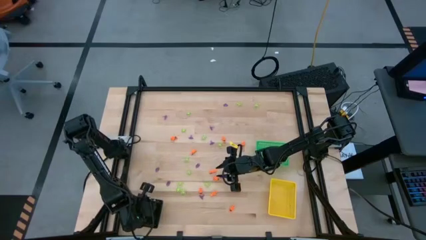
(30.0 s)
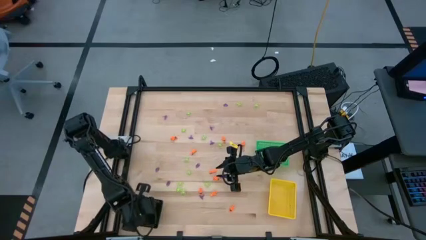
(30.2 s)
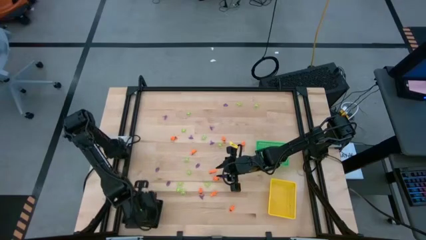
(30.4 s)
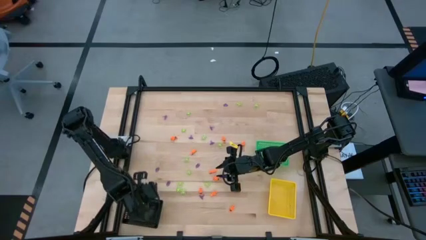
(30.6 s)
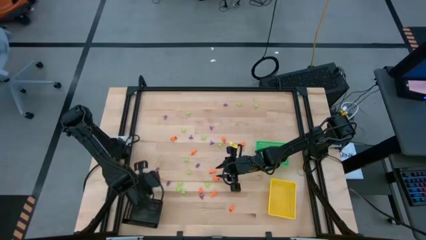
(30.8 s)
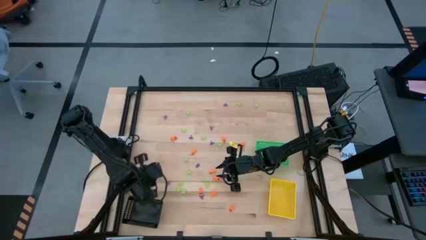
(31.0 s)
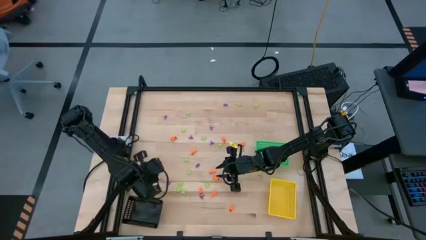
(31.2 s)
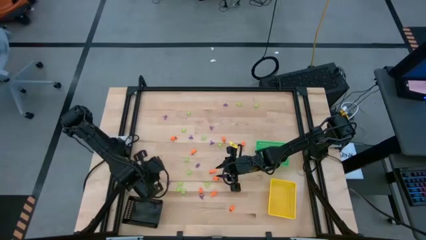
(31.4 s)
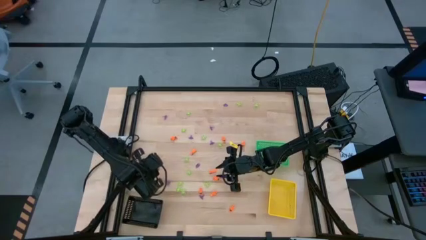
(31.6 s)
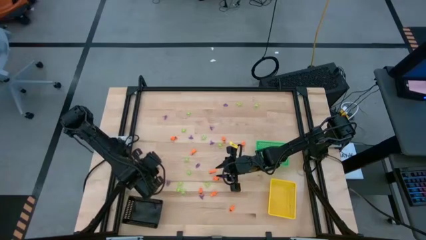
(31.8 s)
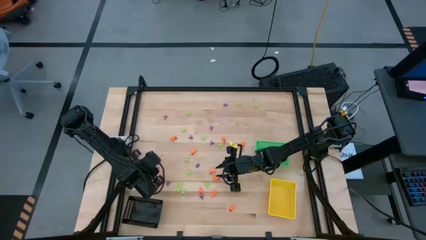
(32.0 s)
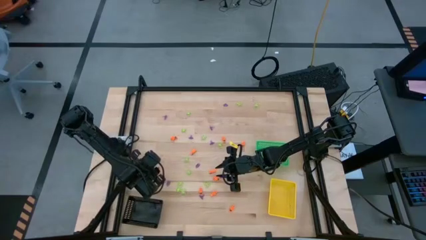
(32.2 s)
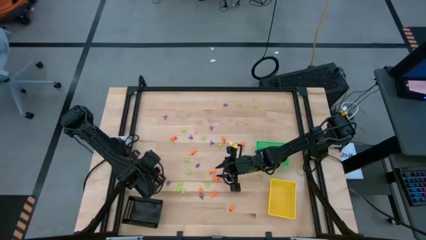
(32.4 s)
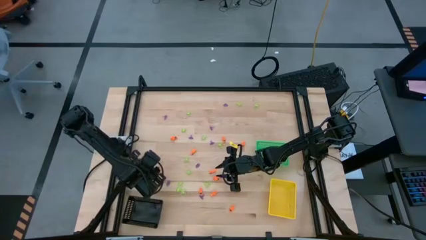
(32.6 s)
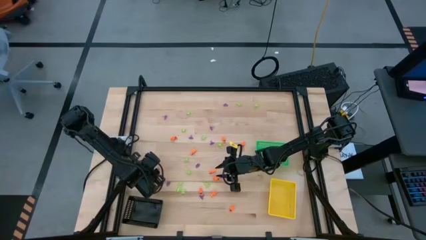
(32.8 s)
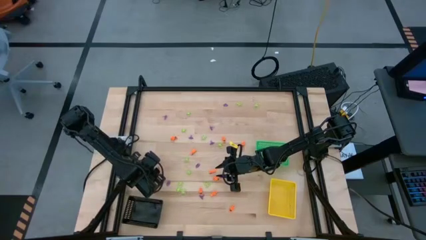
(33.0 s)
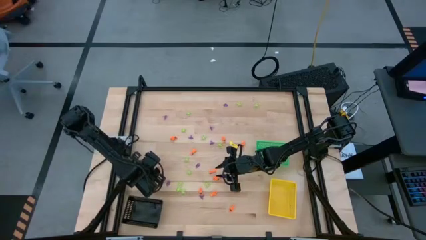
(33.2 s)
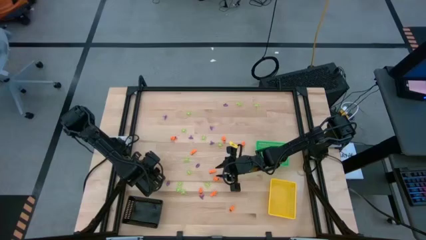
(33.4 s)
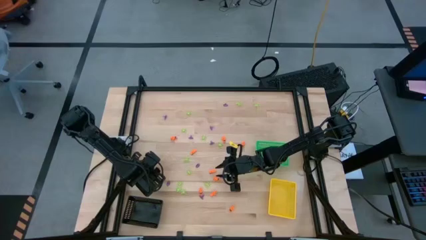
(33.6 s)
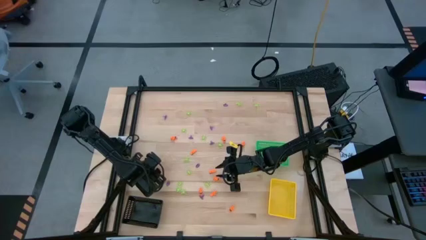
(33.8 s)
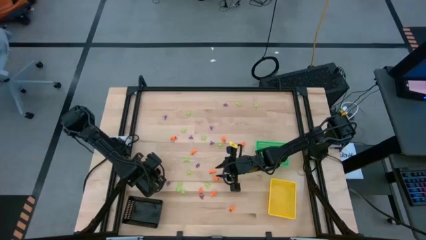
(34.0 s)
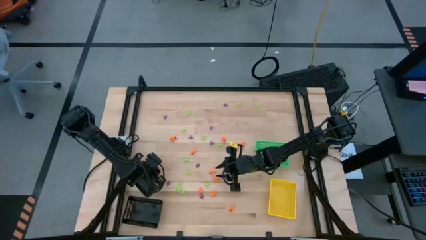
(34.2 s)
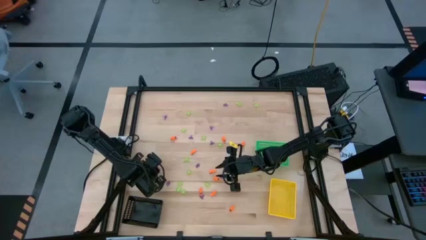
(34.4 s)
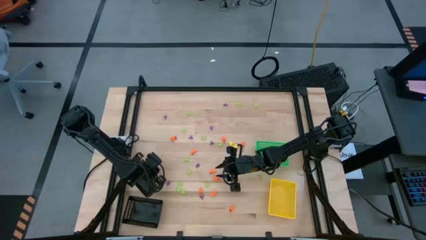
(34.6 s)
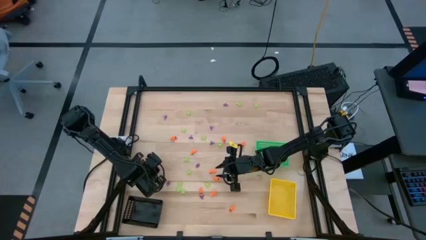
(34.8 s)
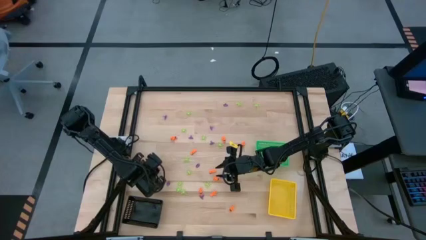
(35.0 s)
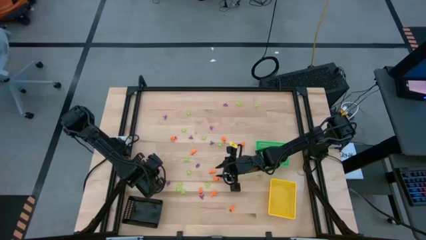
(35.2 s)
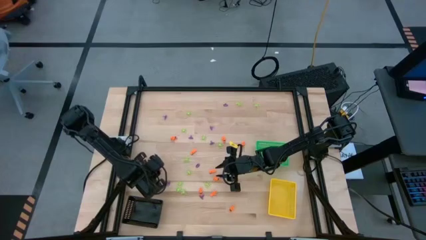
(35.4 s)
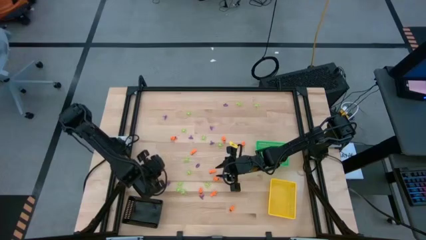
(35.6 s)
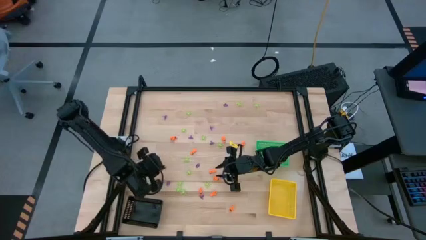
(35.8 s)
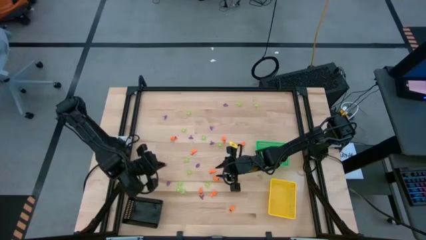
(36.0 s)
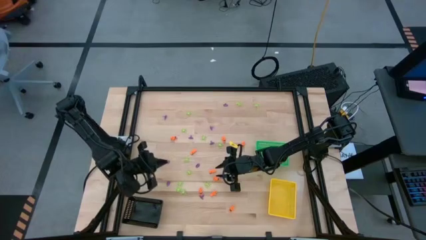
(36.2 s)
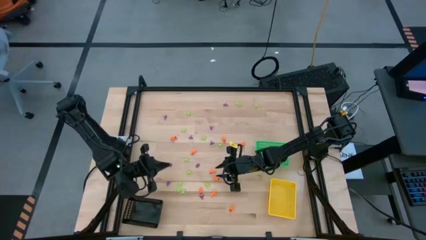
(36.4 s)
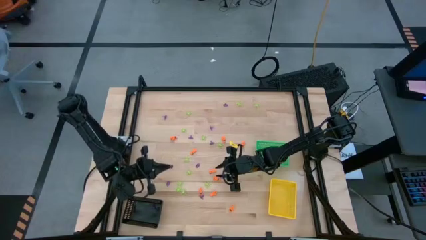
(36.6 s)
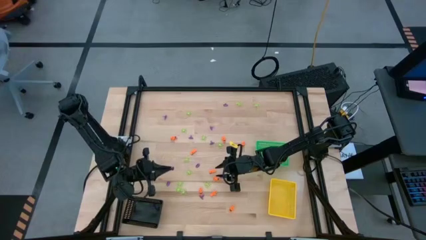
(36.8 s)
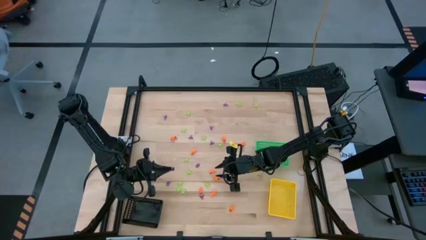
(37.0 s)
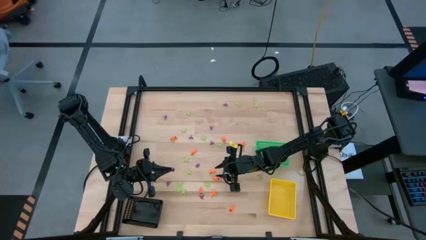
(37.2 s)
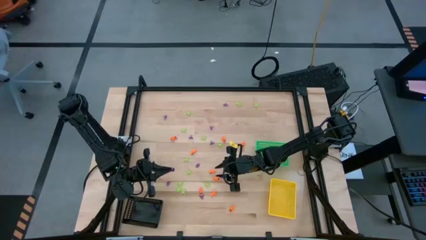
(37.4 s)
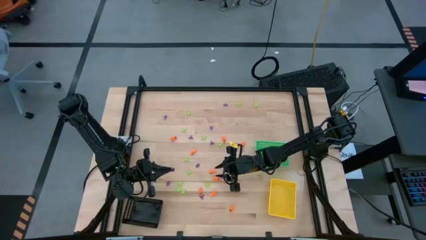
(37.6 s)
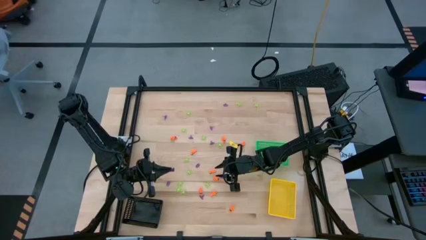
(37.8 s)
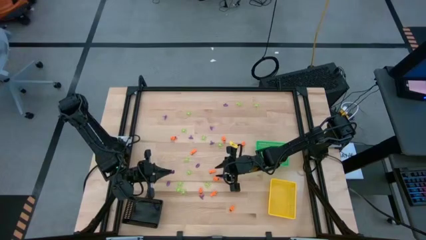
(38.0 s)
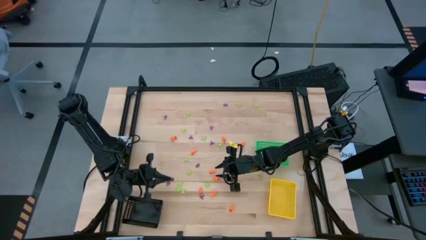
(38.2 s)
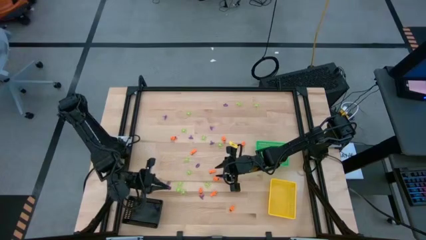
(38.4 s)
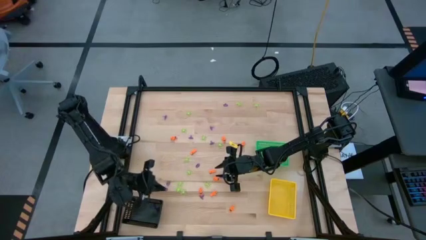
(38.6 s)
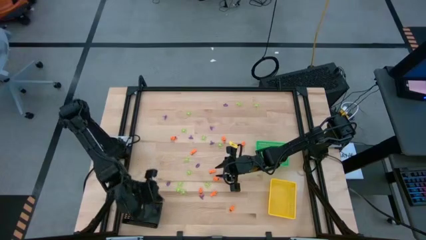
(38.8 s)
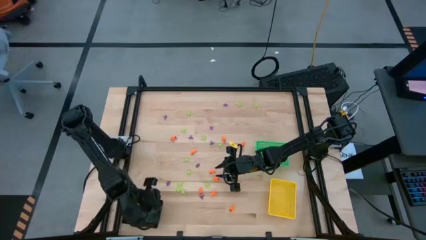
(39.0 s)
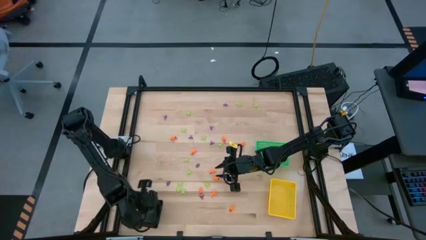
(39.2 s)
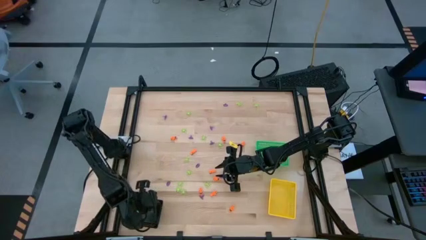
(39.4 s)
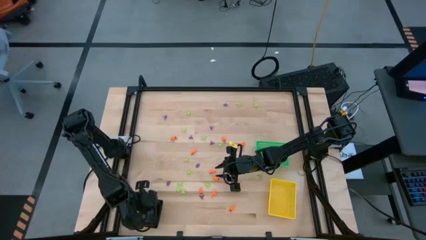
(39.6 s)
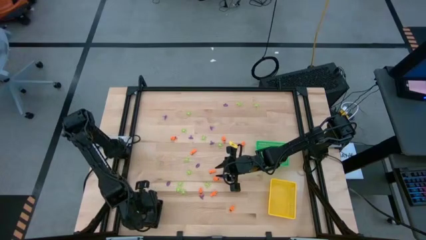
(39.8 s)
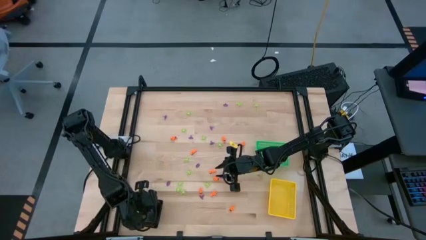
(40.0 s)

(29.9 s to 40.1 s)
Task: Sort Halloween decoration
Put the purple witch hat toy into the black bin

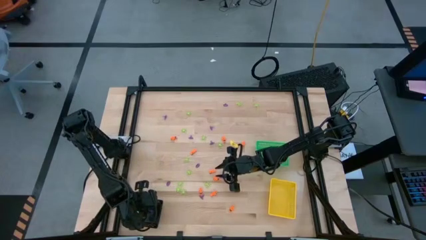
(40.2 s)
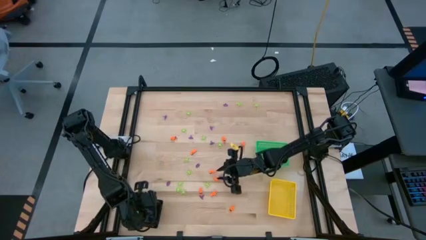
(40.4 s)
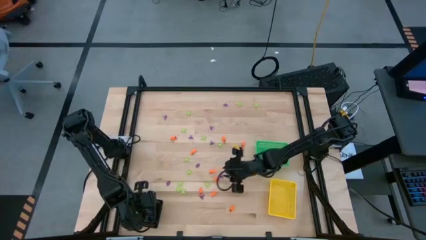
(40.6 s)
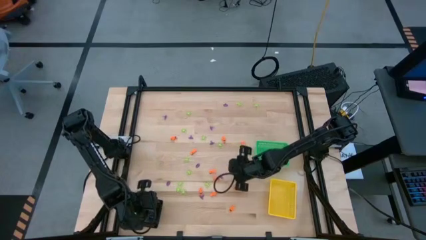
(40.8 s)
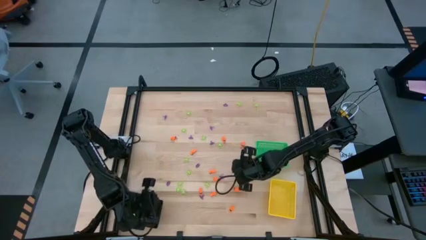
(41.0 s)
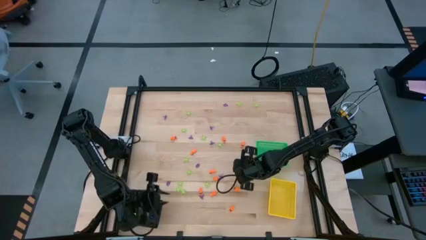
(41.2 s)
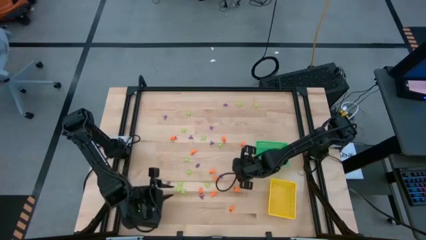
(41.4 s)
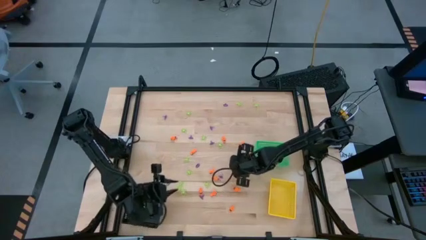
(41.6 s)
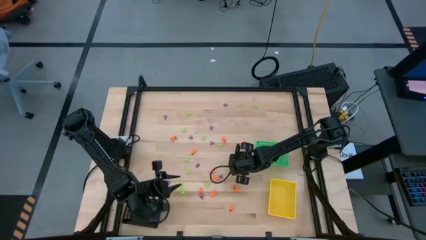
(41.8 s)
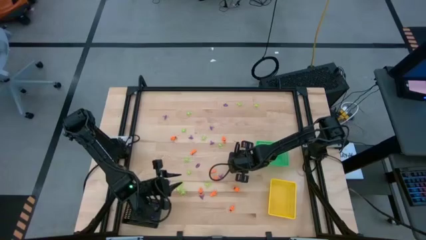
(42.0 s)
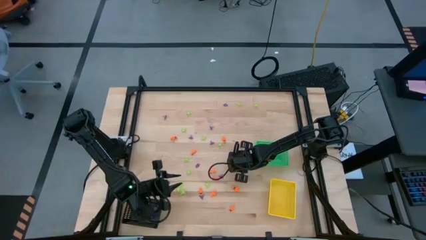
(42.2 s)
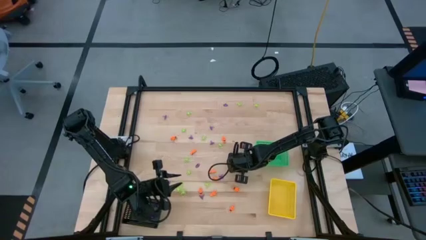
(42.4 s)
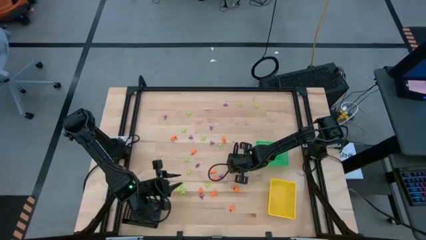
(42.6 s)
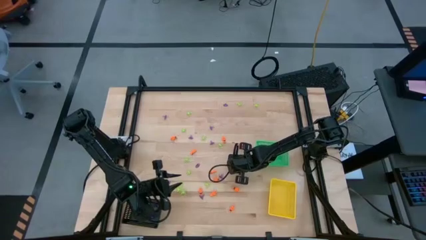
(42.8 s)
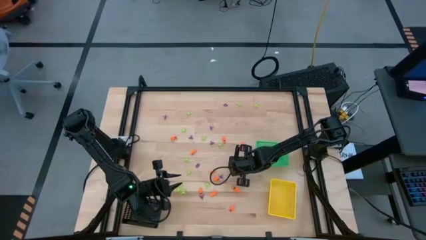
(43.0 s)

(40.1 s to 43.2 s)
Put the purple witch hat toy into the black bin
